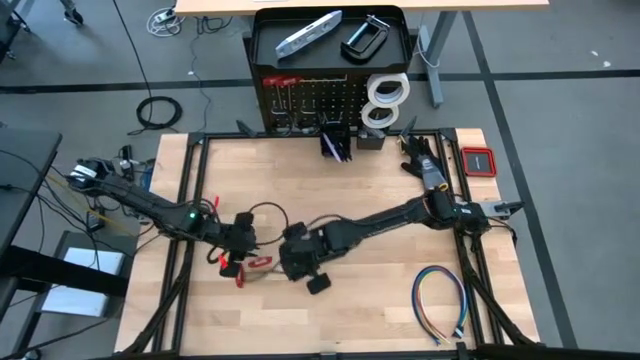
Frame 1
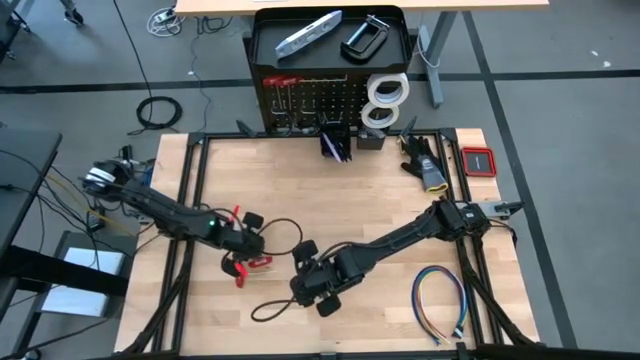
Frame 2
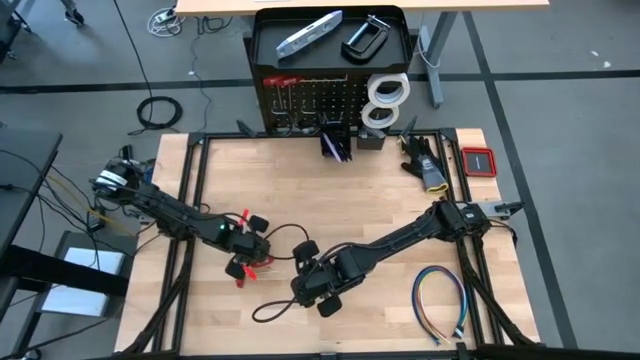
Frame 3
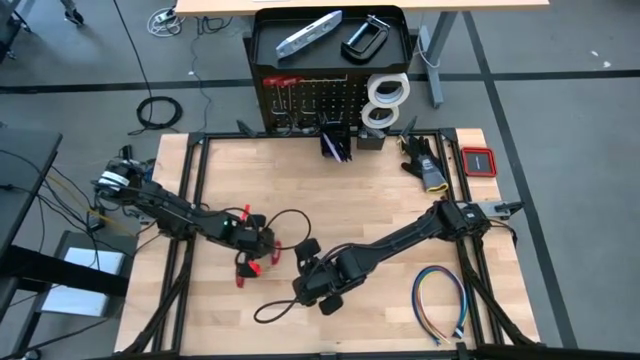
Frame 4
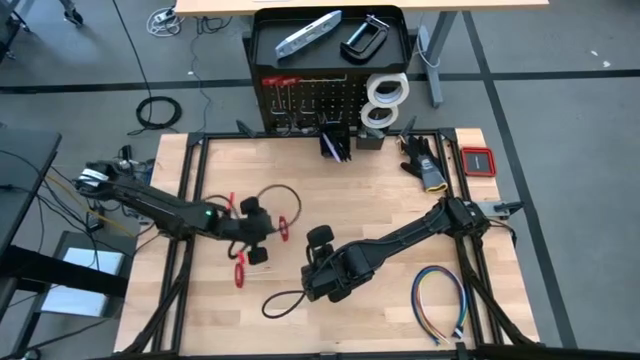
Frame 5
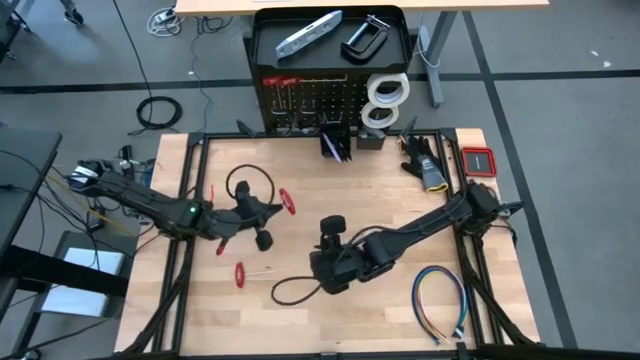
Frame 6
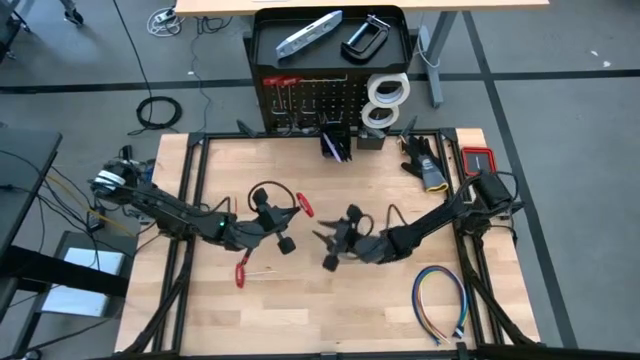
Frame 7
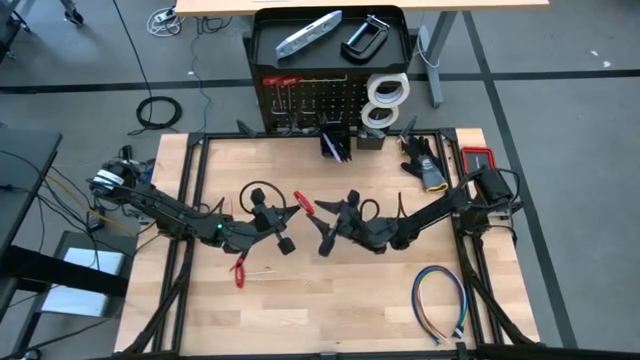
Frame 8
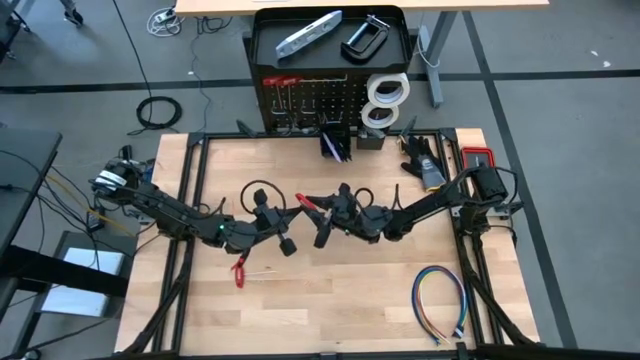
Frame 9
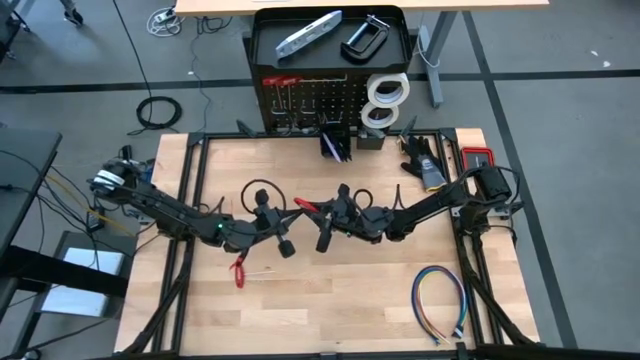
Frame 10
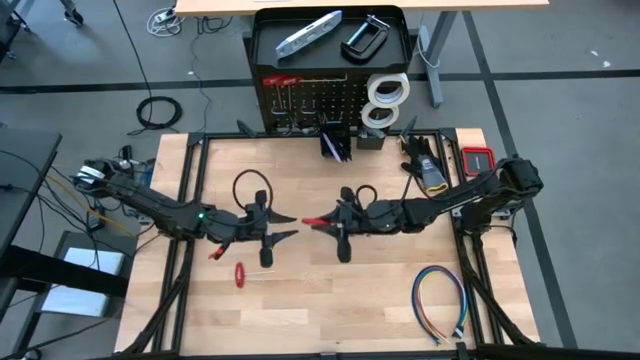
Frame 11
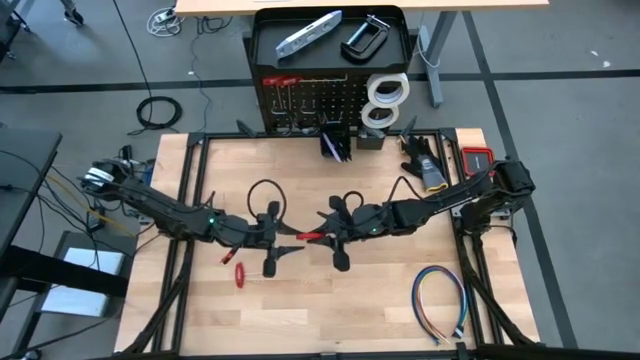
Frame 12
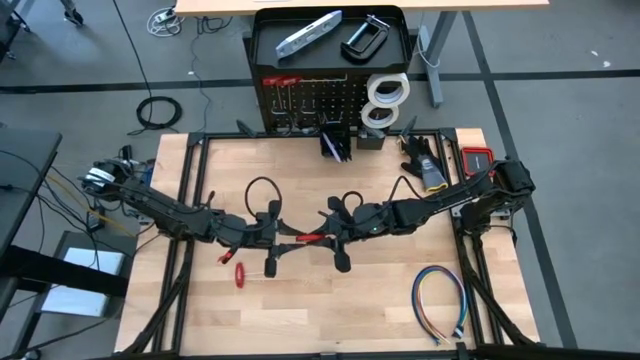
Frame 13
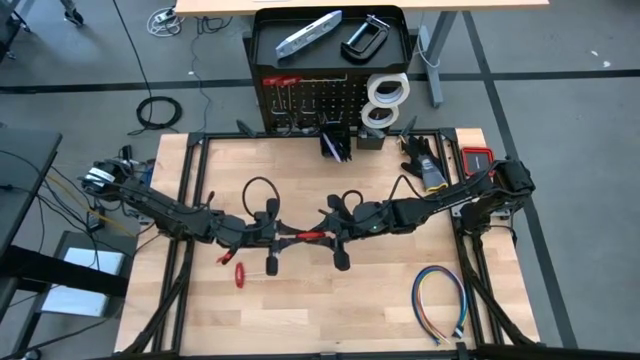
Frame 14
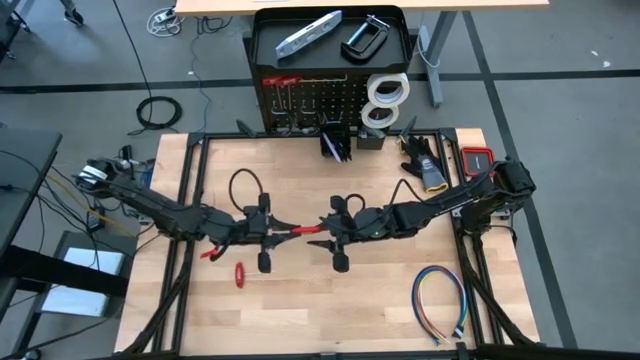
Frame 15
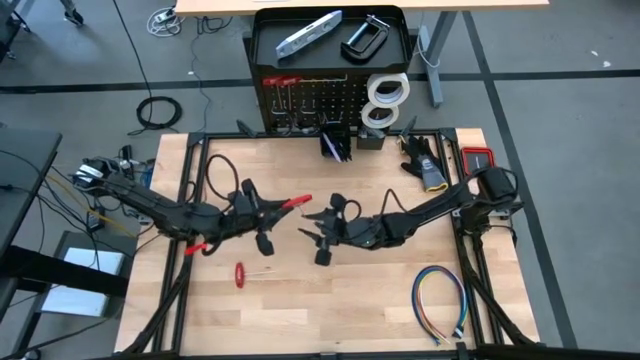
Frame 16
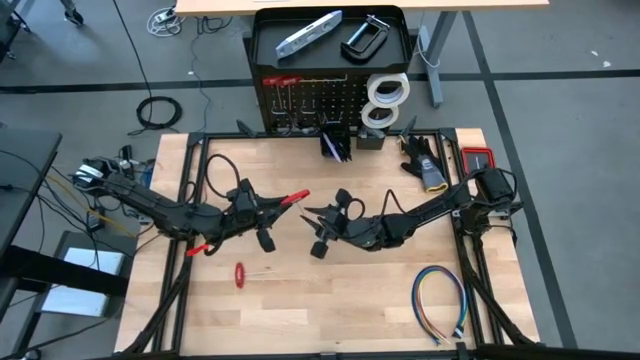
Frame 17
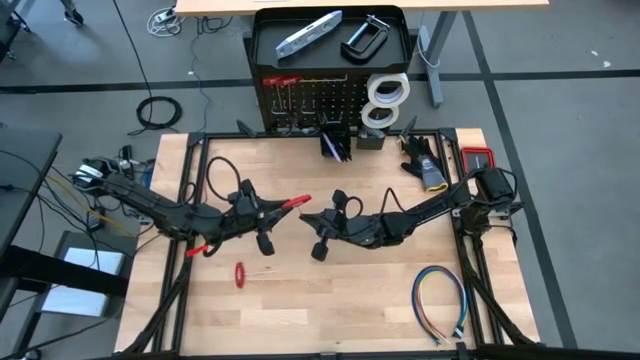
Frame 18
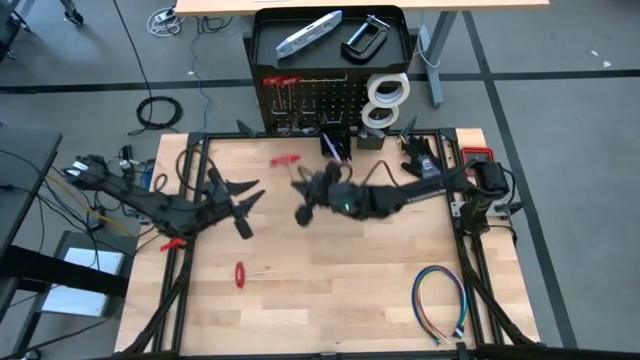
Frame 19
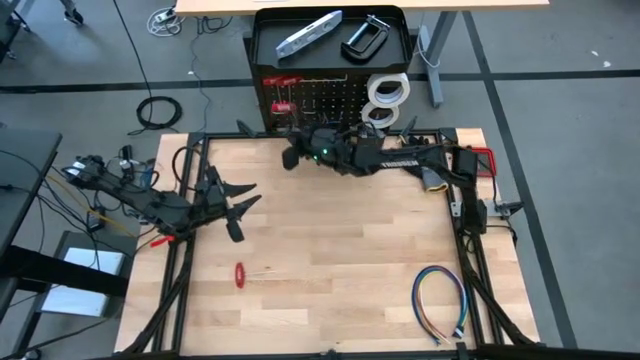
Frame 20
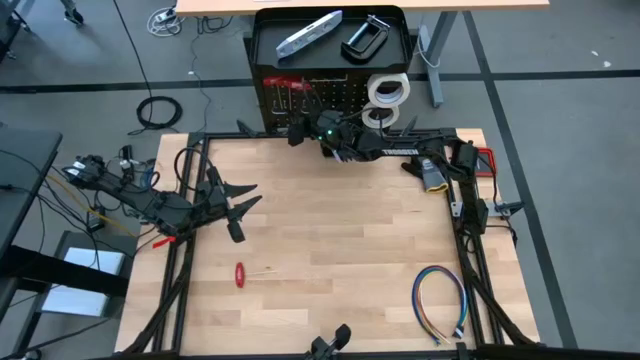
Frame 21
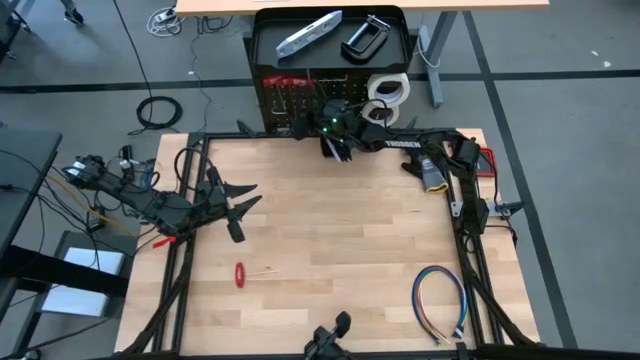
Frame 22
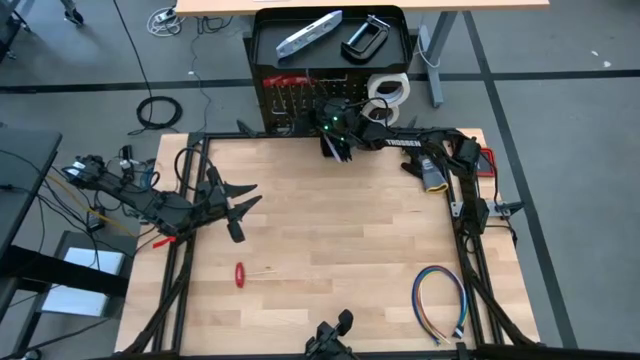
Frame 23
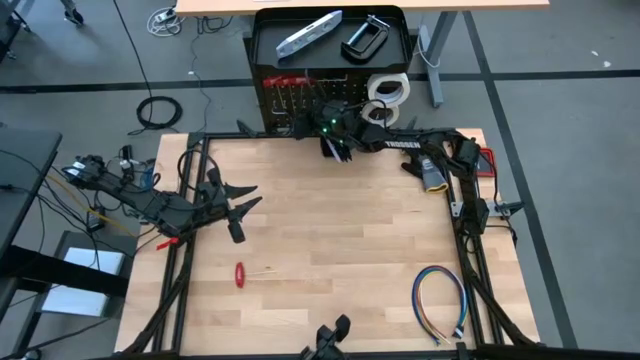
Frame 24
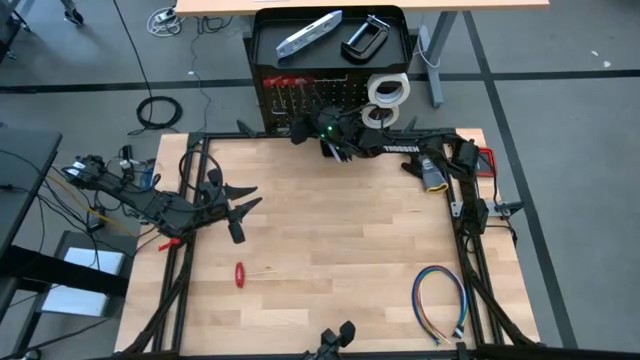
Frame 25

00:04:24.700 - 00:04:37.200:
Task: Hang tools onto peg board
Hang the red allen wrench on the peg board

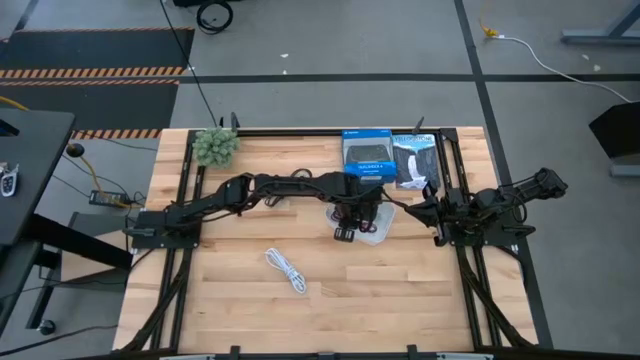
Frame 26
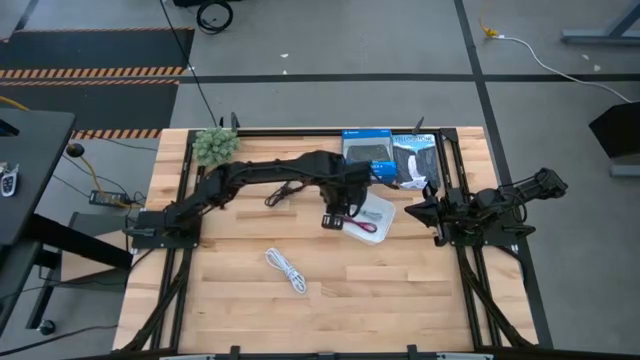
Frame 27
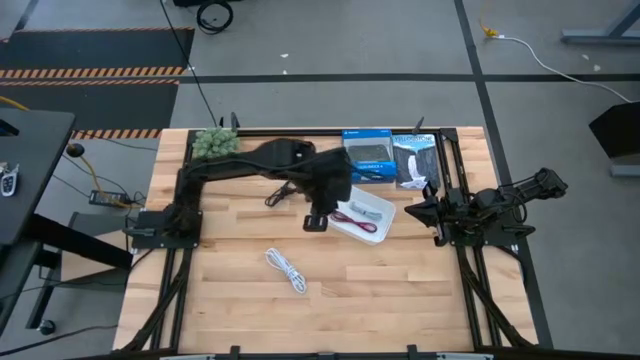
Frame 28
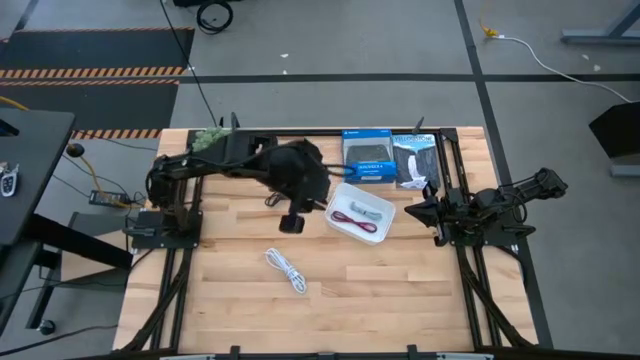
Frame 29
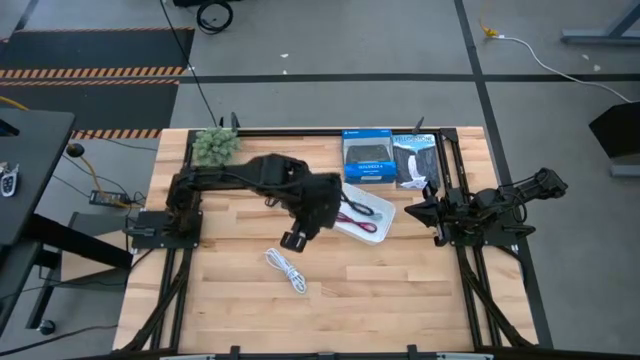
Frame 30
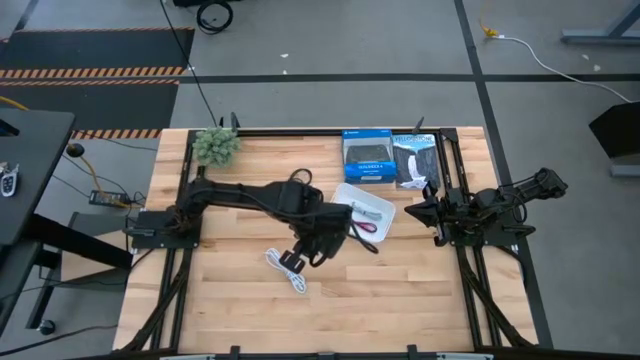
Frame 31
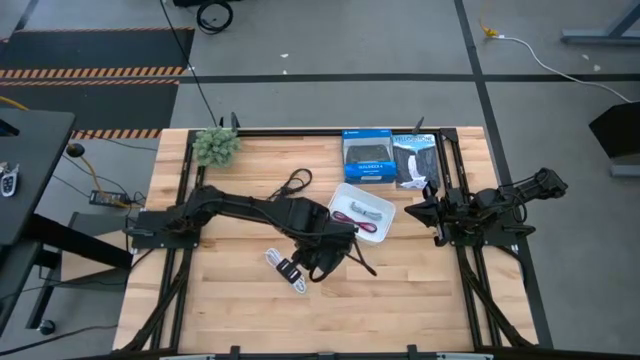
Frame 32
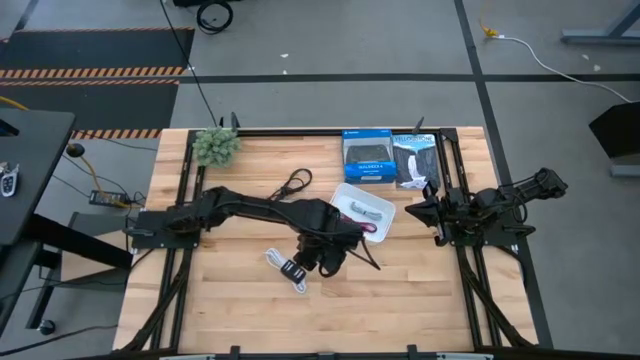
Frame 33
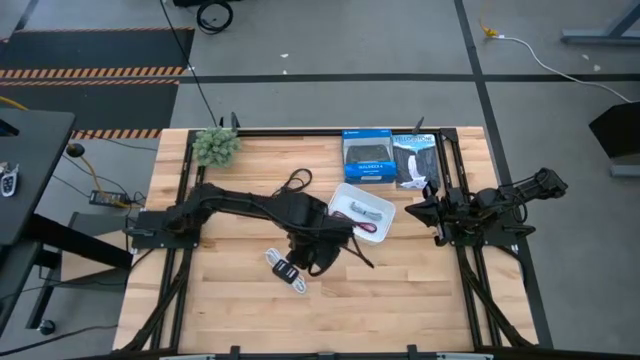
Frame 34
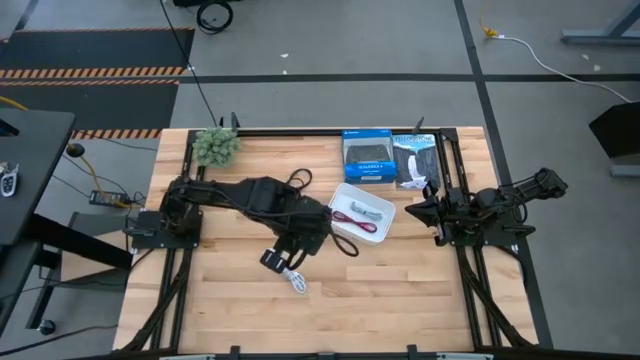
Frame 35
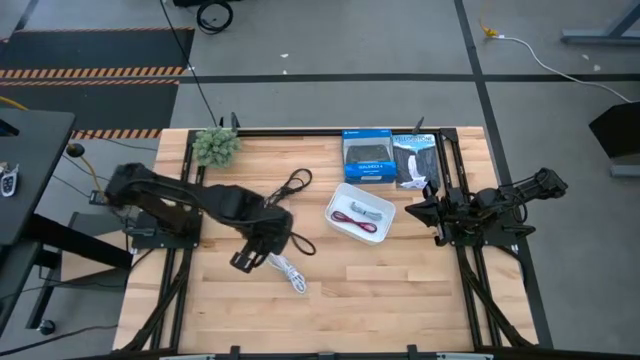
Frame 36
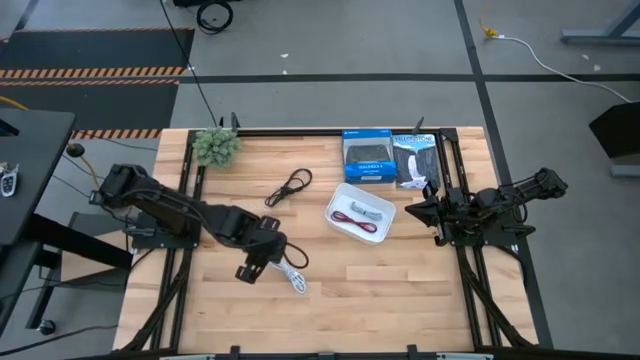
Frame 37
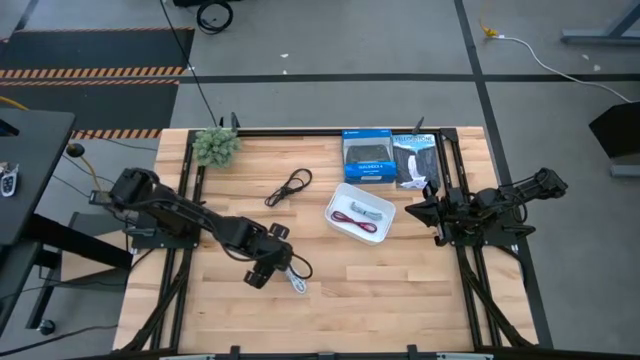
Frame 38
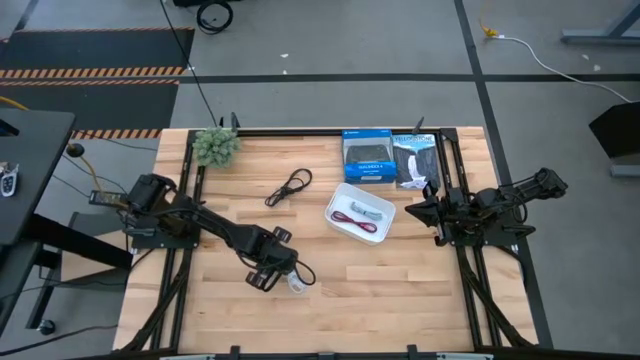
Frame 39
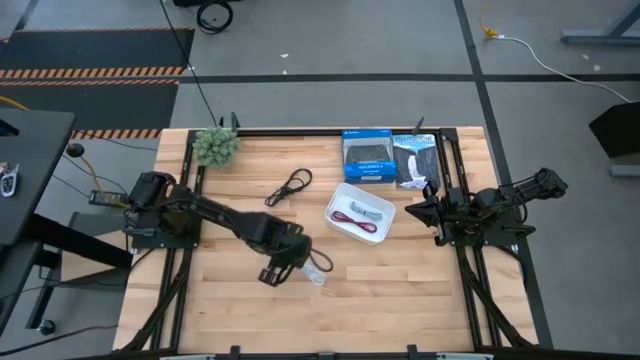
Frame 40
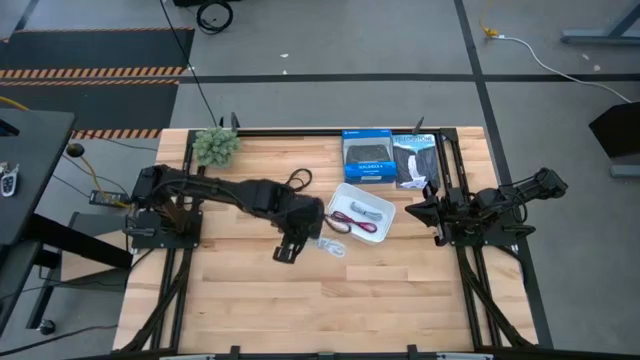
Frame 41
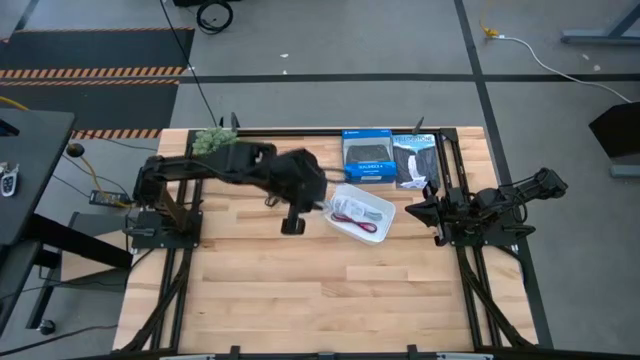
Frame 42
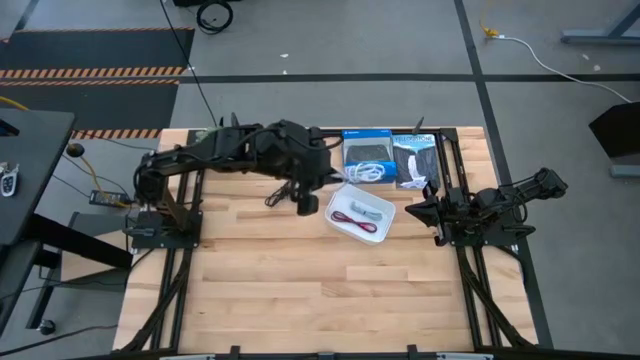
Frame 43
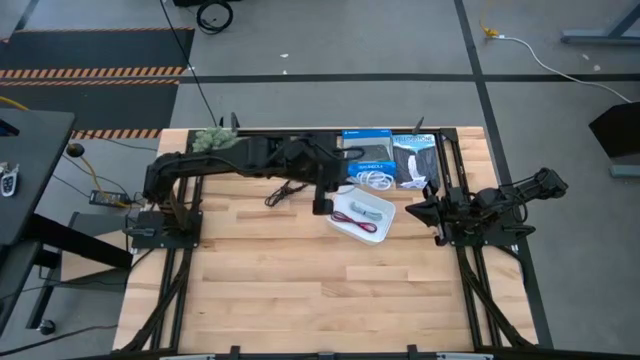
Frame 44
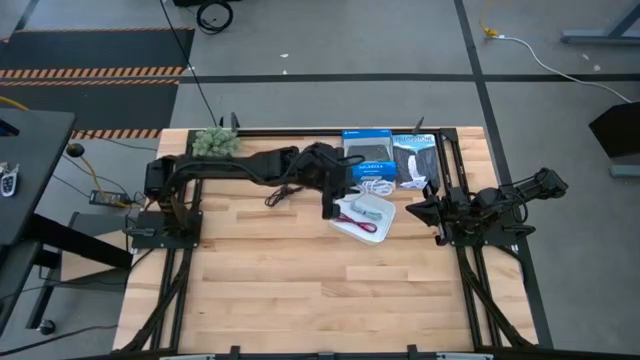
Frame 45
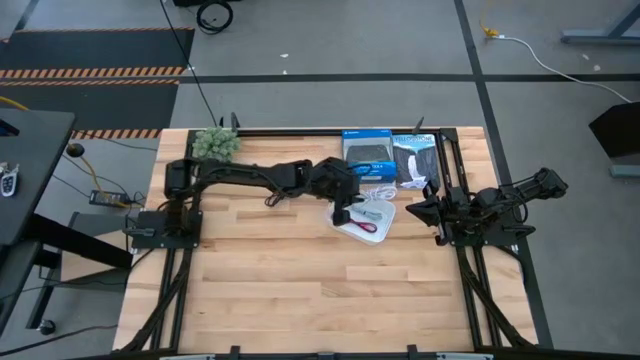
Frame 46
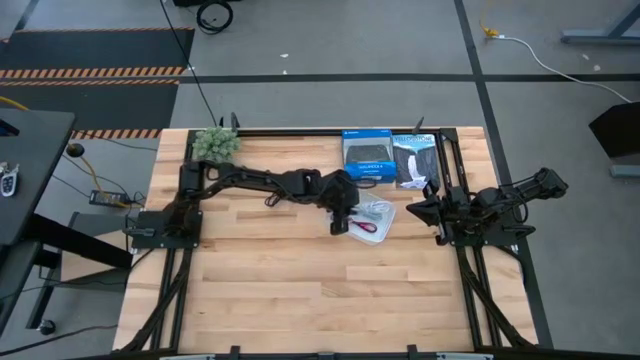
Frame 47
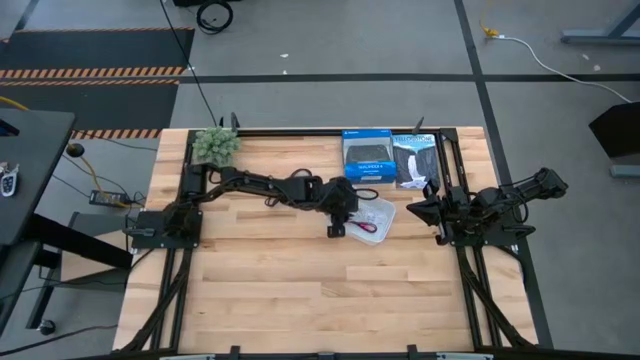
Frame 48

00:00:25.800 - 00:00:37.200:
Task: Pick and place USB-C Cables
Put the white charger cable into the white bin
